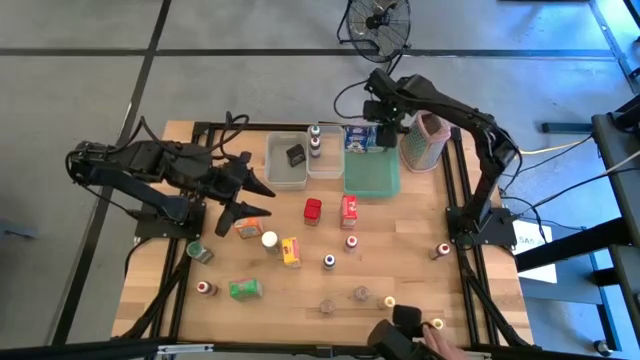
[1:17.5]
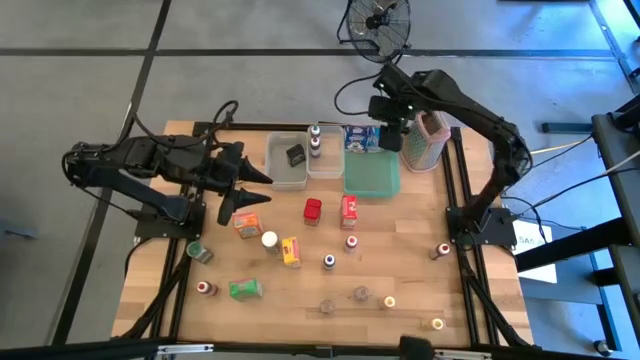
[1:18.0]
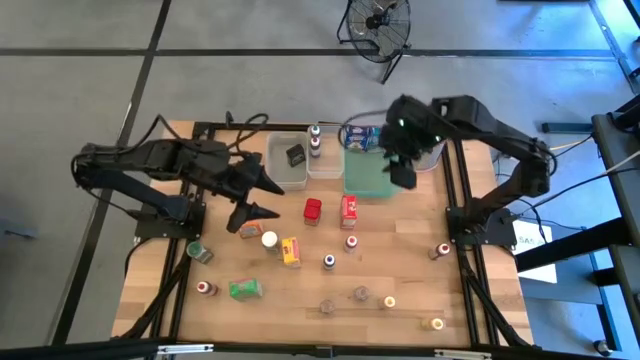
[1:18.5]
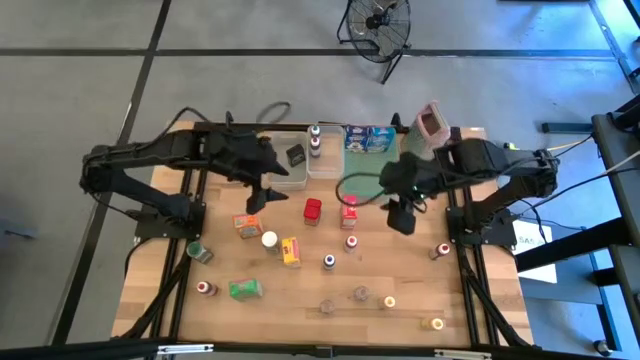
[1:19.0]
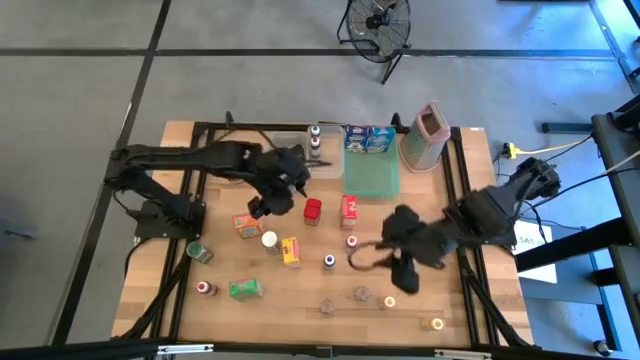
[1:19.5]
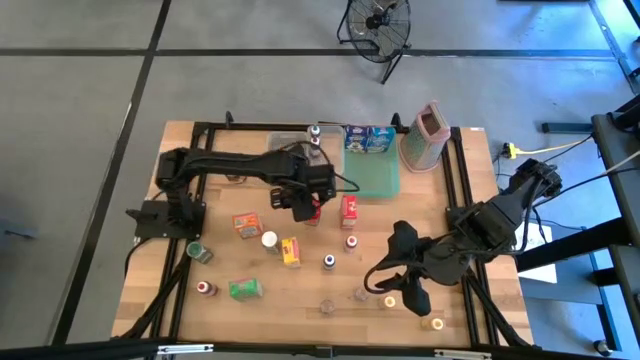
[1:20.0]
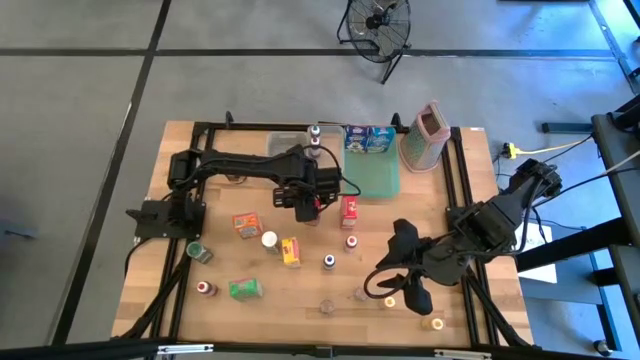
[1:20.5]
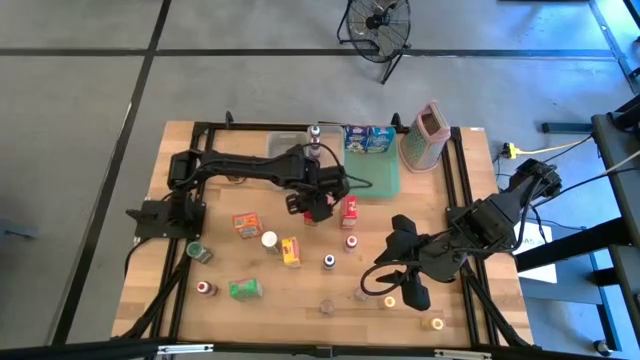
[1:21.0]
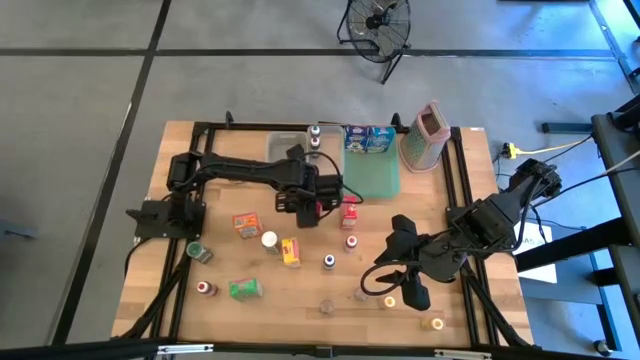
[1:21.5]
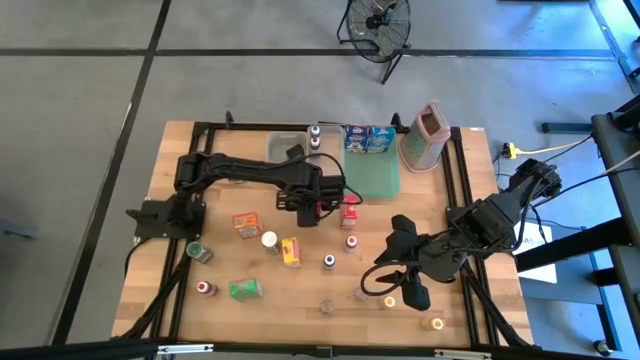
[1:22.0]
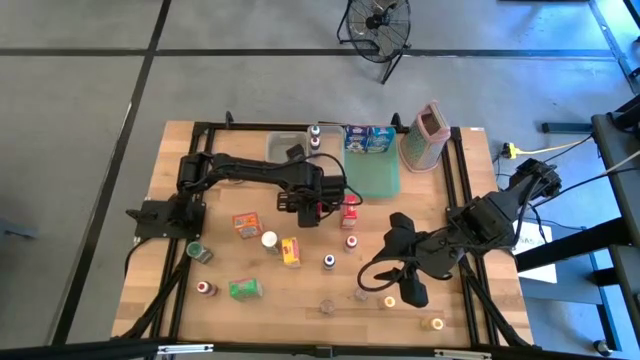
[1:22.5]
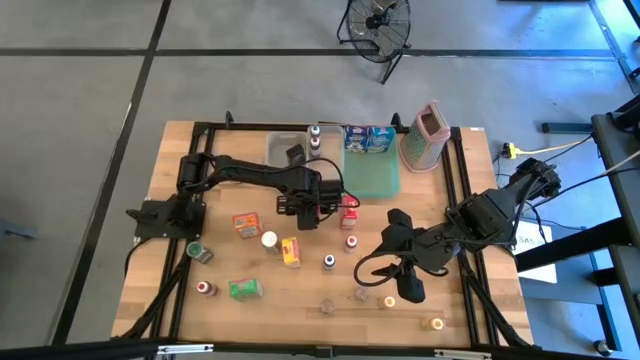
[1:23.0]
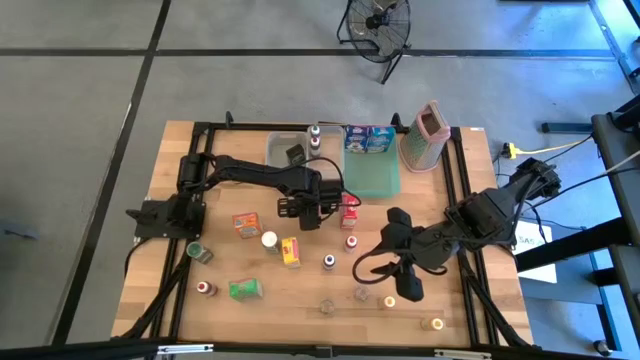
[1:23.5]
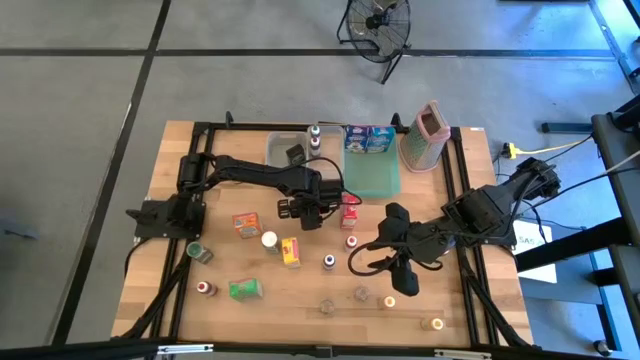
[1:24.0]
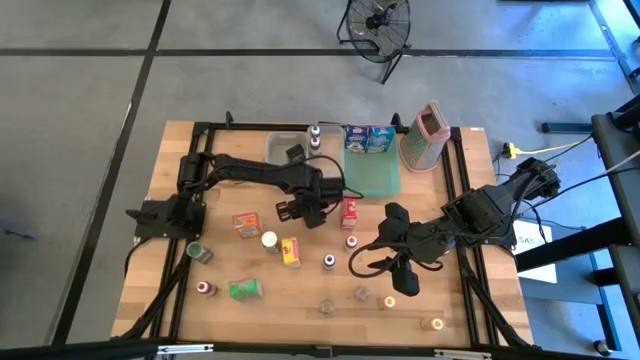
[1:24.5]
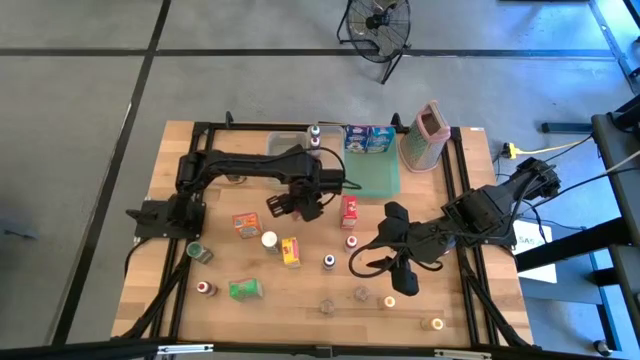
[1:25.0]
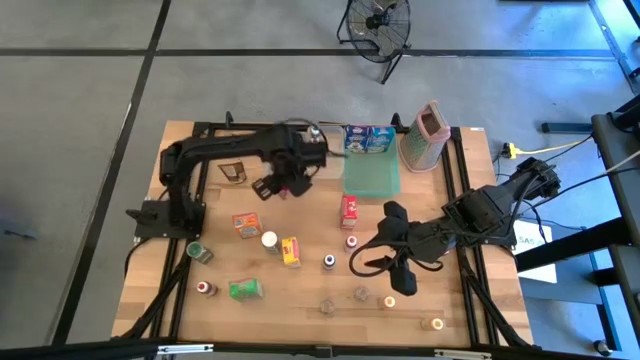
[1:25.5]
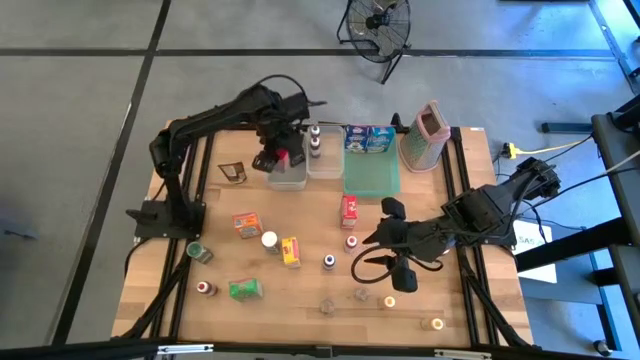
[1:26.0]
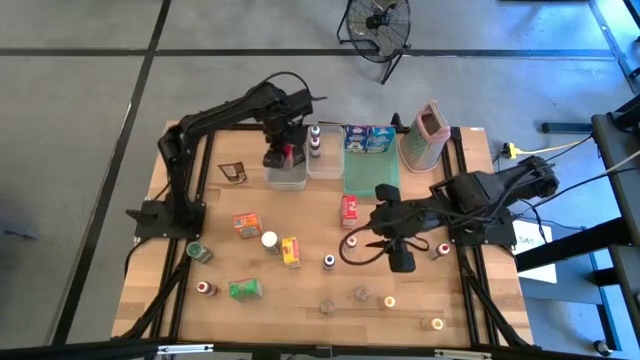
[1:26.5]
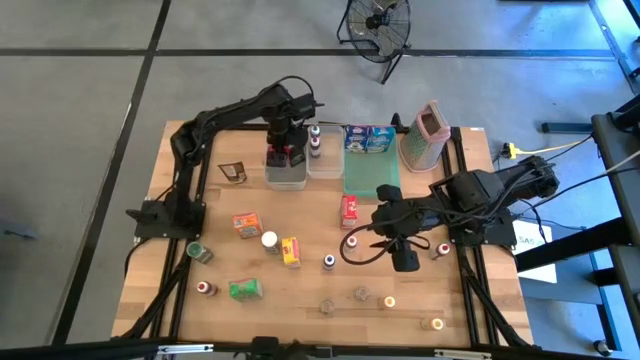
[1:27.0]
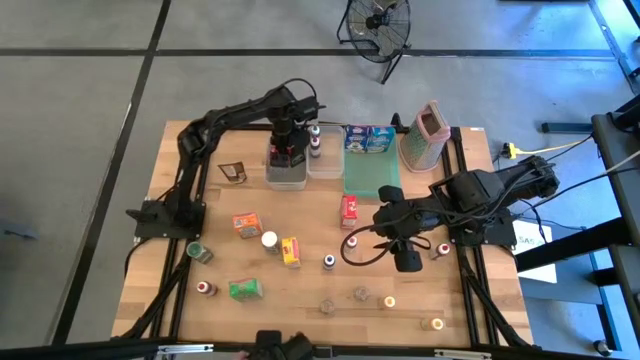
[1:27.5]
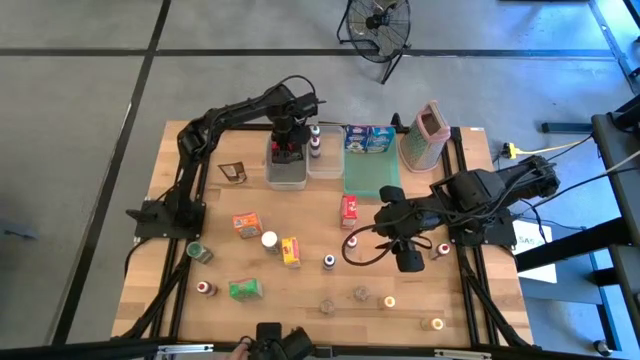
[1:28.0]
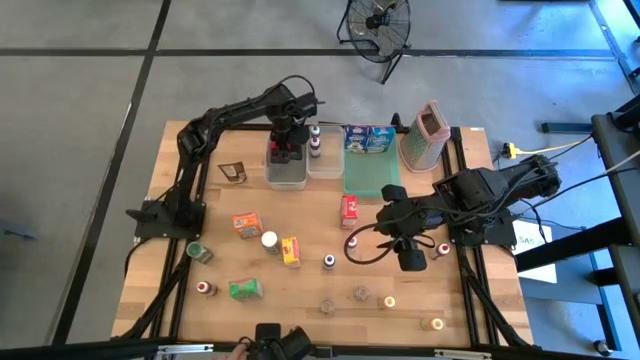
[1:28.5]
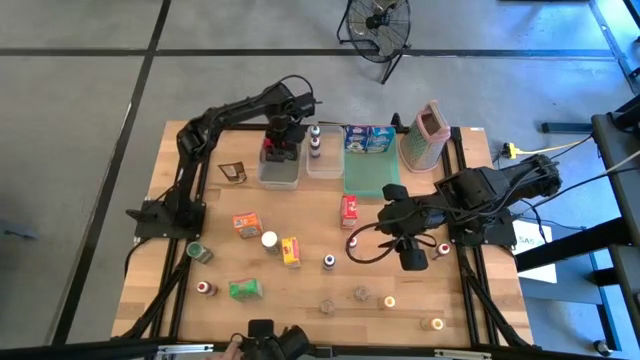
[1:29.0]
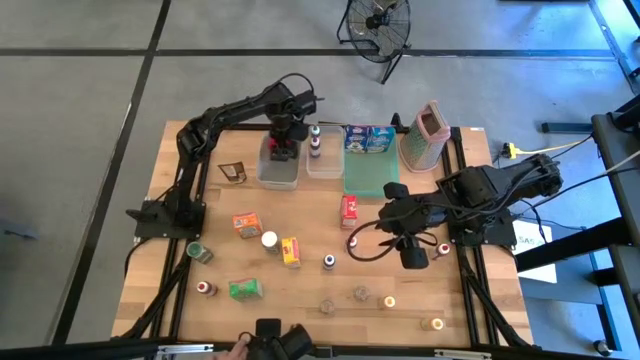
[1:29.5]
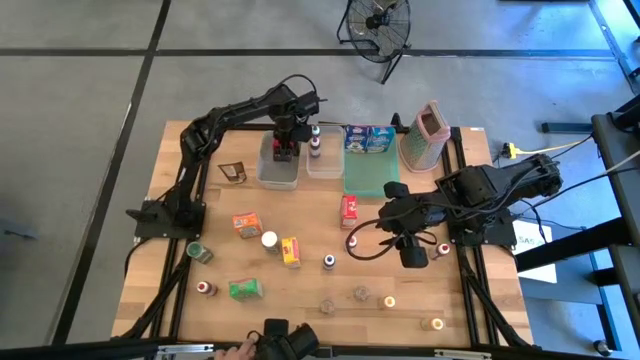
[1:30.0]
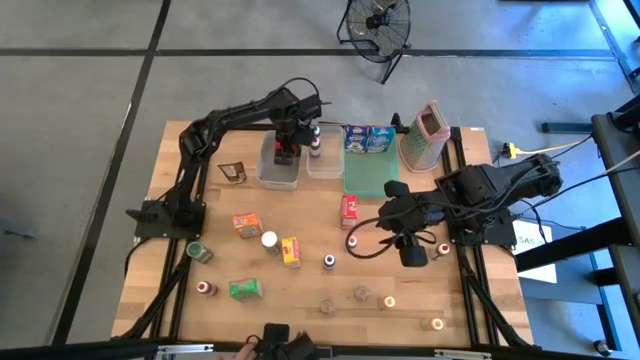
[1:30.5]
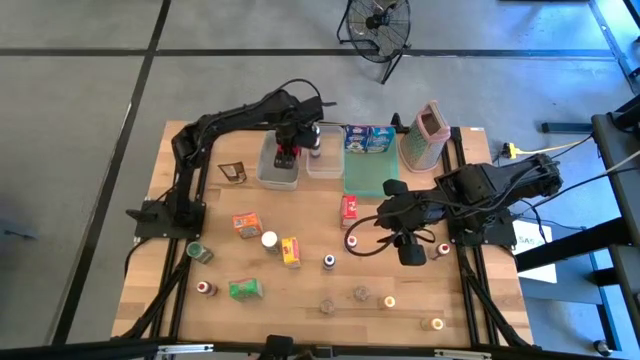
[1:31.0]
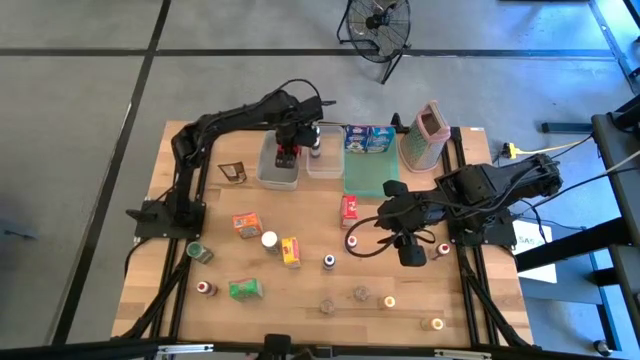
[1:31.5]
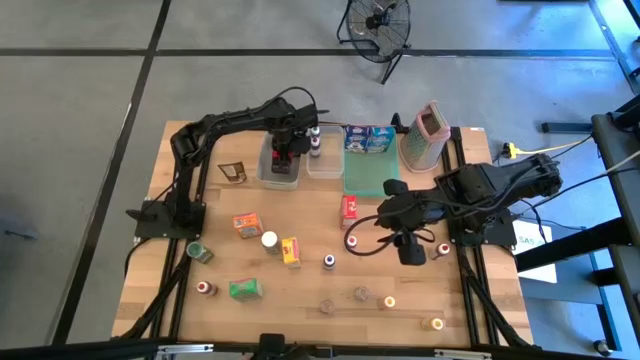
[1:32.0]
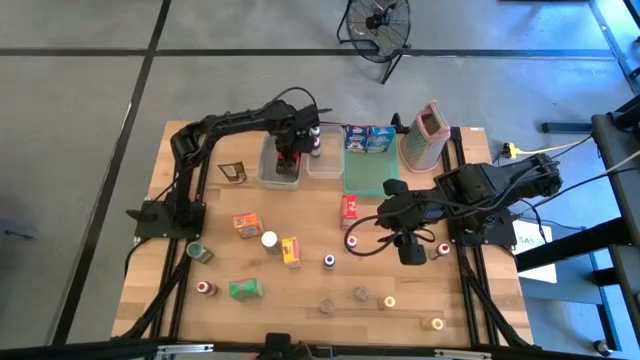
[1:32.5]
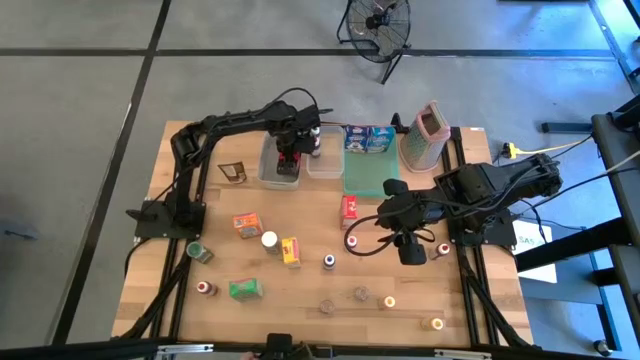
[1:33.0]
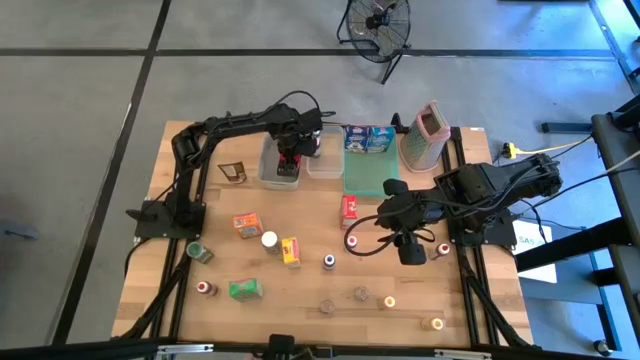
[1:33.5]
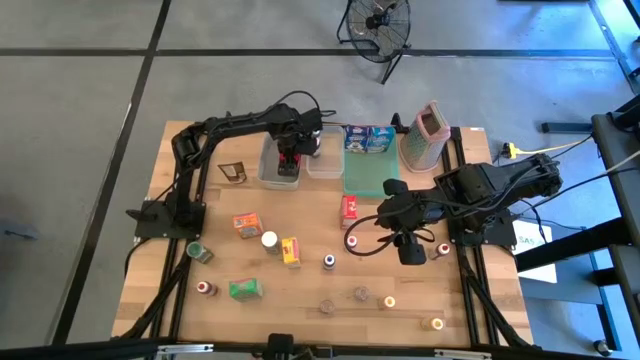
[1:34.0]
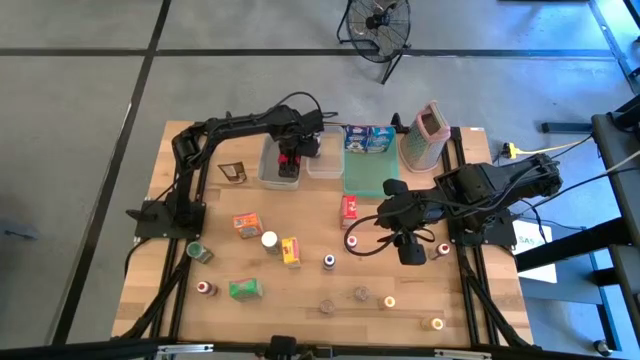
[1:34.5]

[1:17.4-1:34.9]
Task: Pick & Place Kitchen Items
Put the red seasoning can into the gray bin

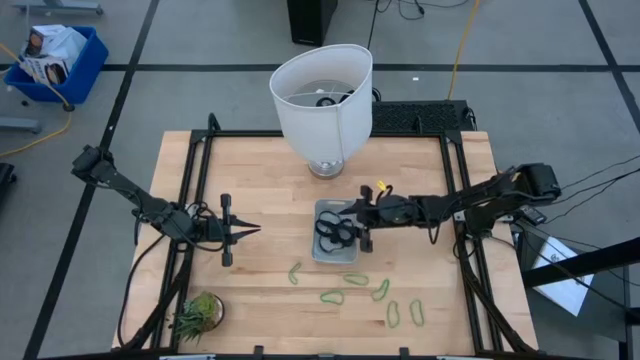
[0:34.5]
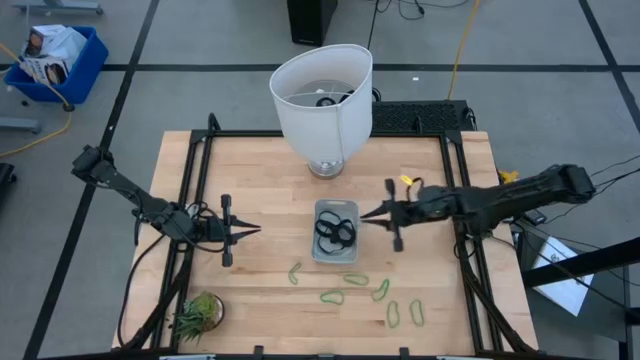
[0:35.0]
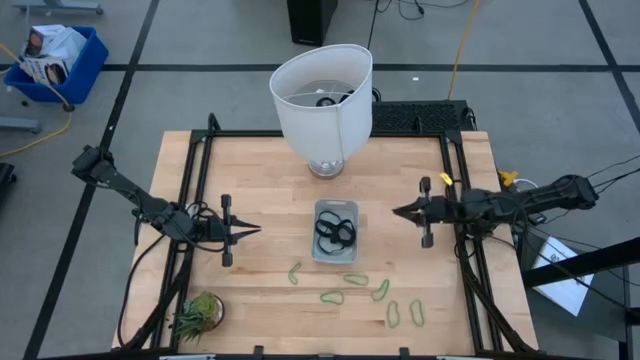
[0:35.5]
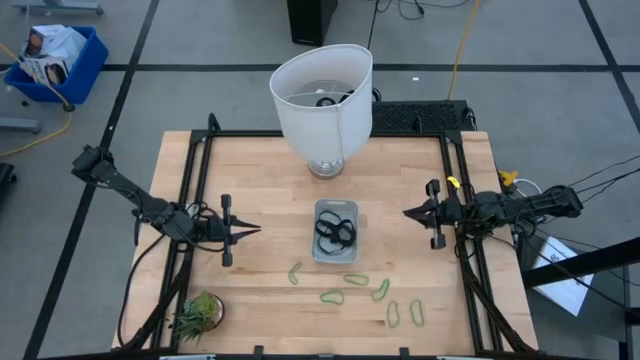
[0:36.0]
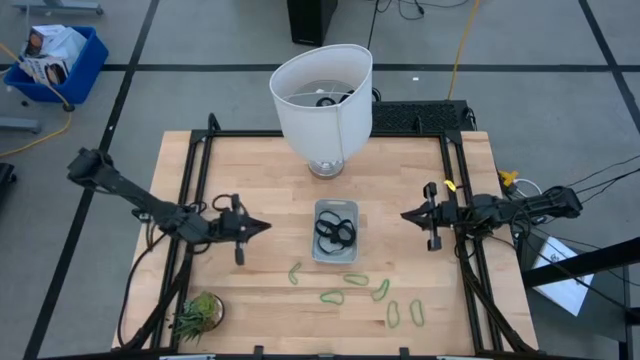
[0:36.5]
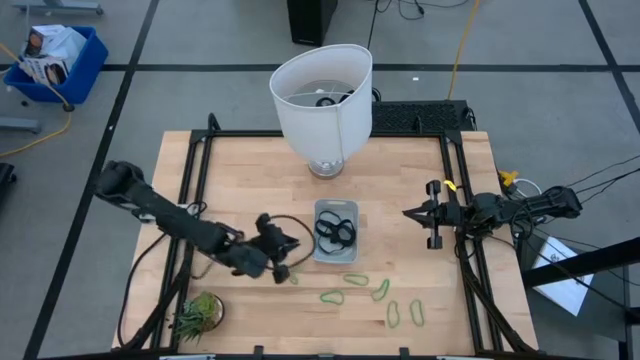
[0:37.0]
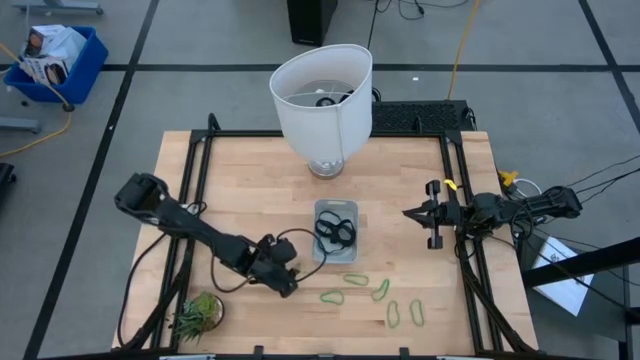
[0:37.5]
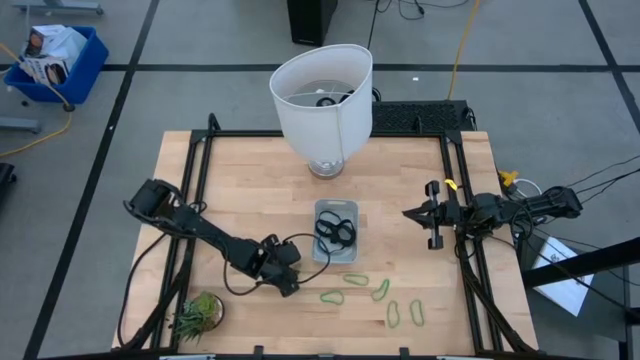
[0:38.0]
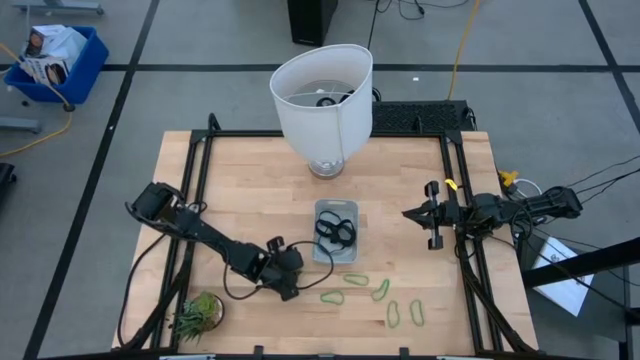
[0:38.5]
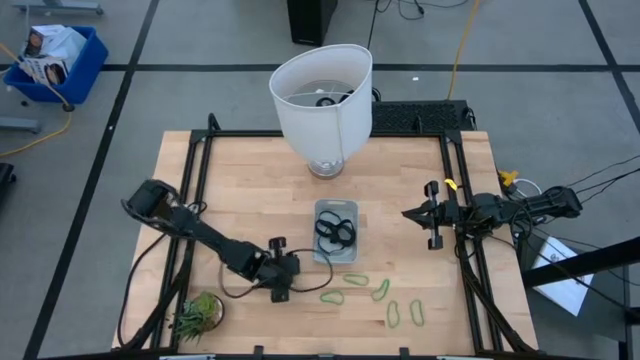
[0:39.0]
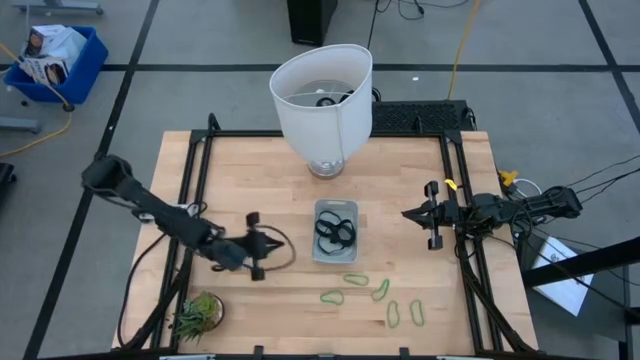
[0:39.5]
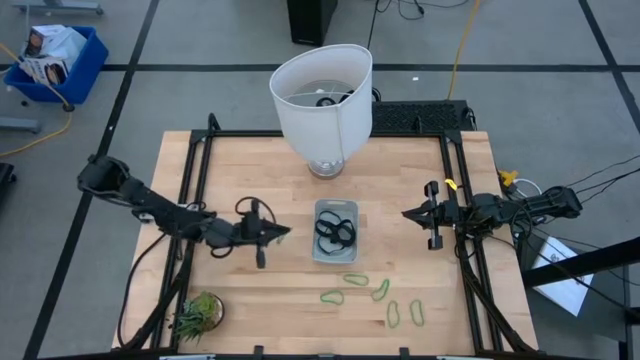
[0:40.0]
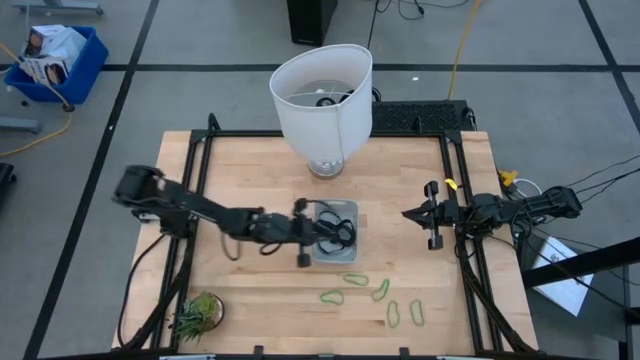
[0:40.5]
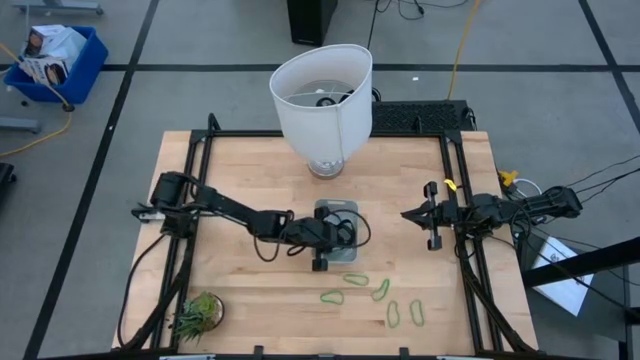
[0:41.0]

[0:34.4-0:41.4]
Task: Pick and place rubber bands into bin
Put the green rubber band into the gray bin
